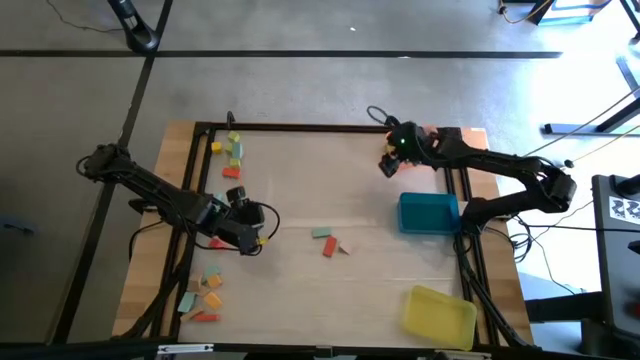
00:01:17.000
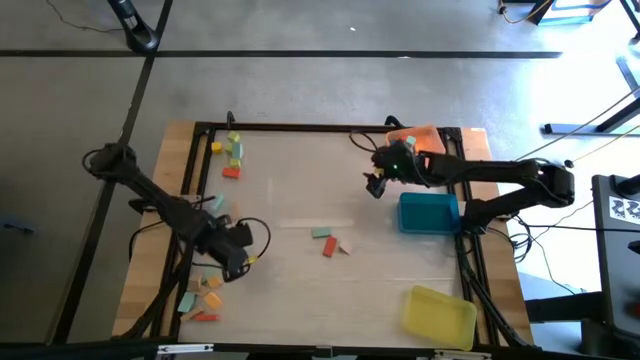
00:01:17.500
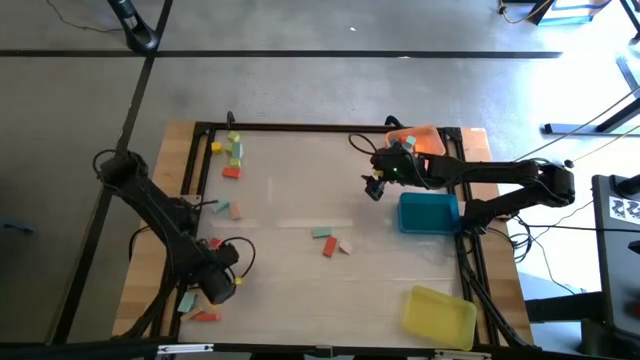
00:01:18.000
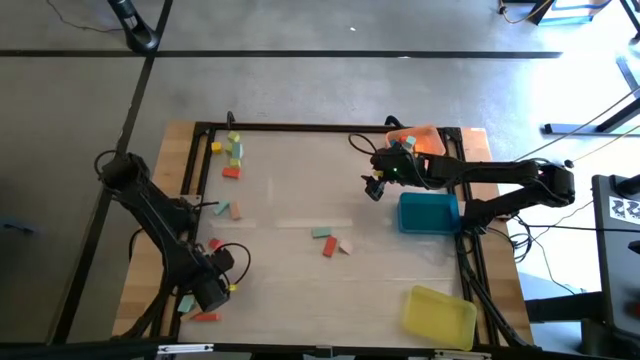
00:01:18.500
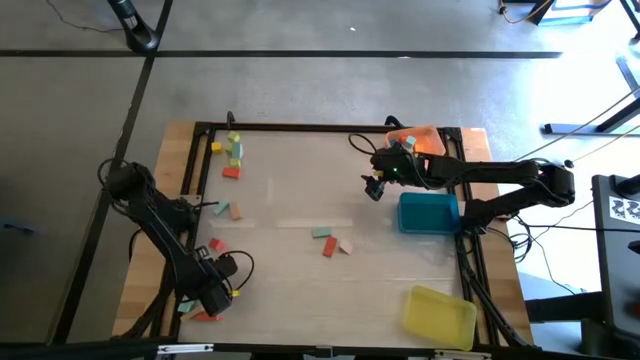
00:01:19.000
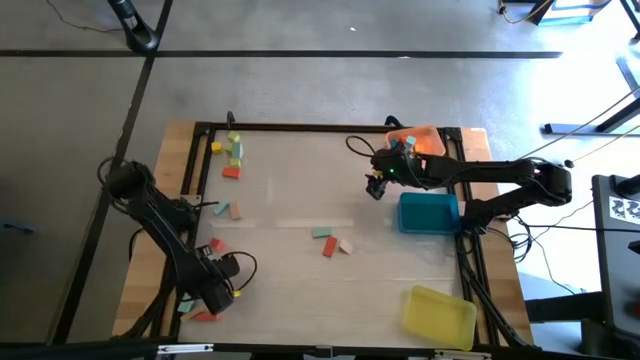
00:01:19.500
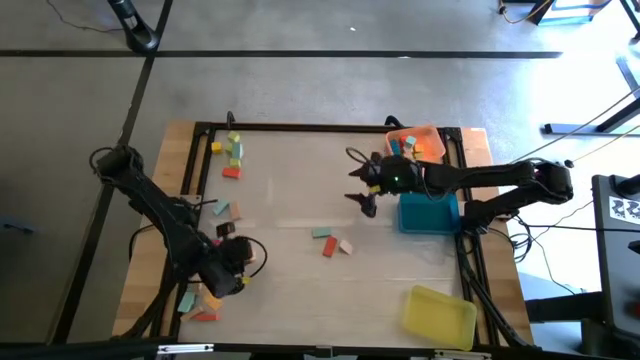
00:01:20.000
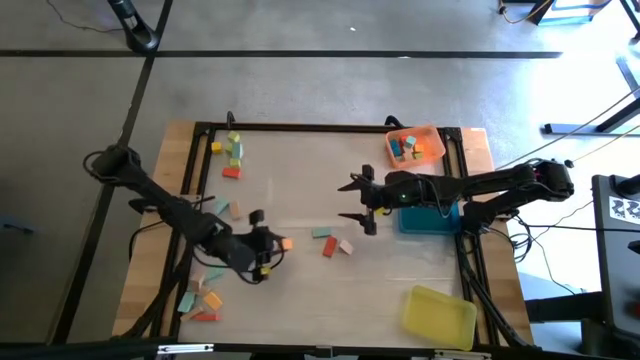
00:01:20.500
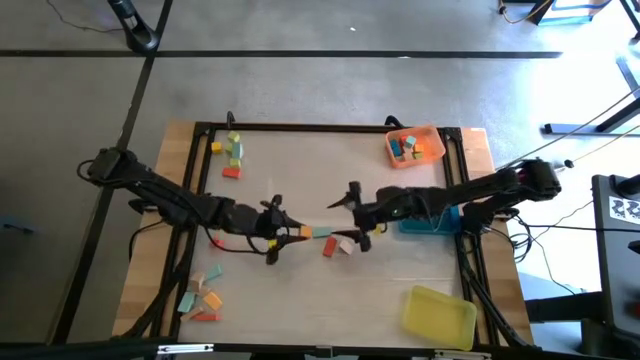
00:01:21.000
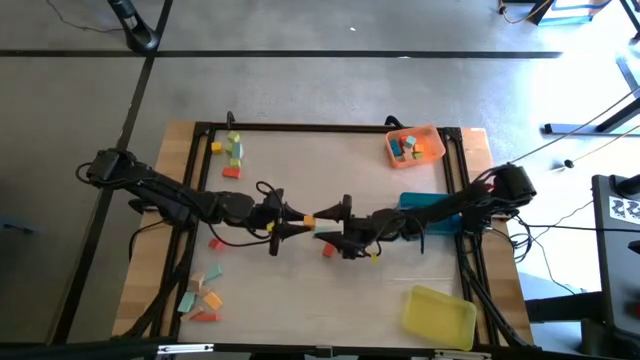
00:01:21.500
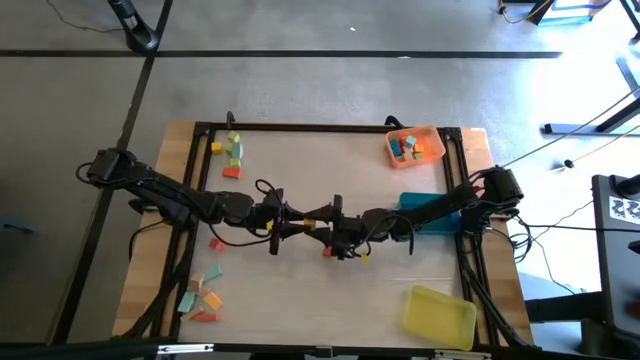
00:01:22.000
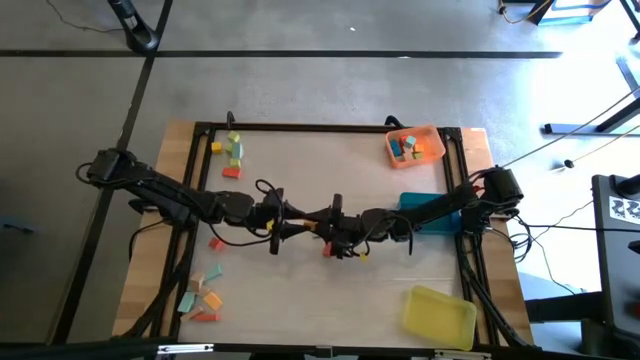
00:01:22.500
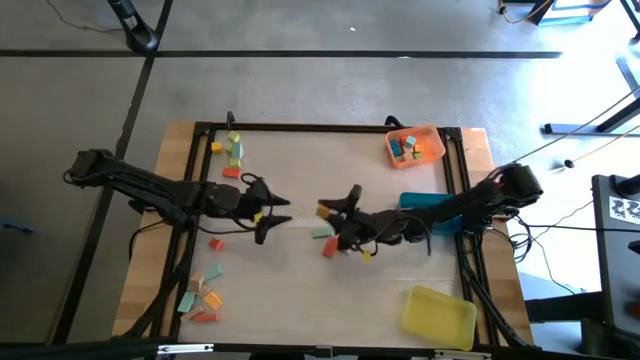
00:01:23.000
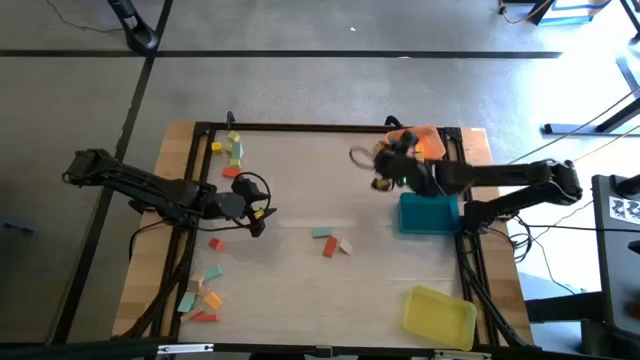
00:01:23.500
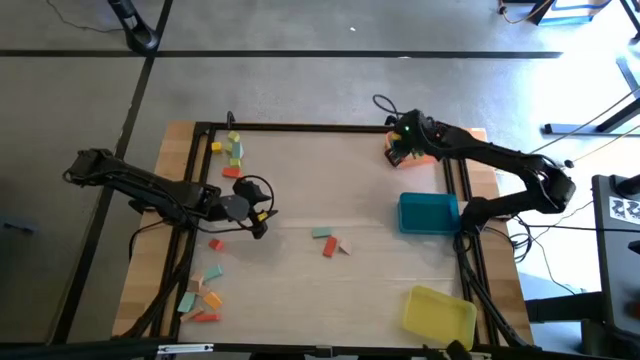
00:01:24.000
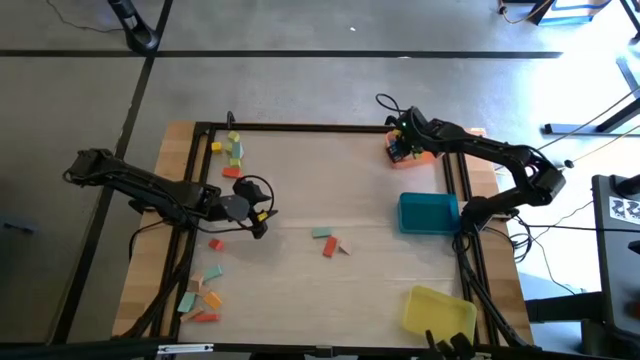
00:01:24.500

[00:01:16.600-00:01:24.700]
Task: Sort blocks by size
Put the orange cube block into the orange bin

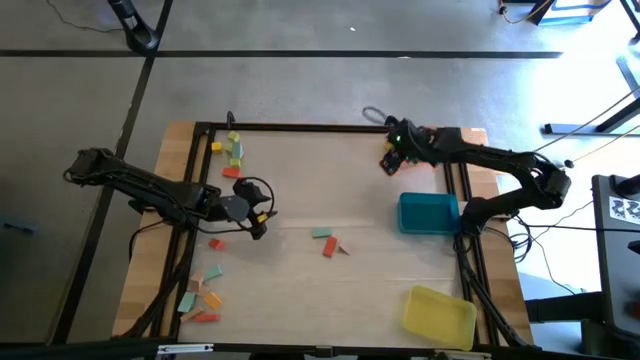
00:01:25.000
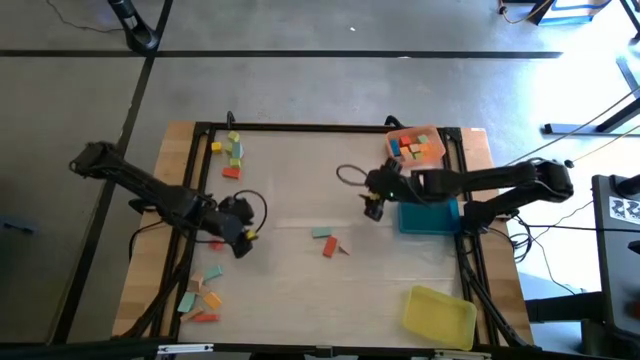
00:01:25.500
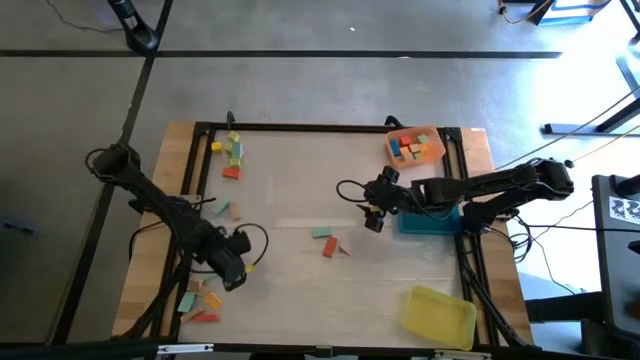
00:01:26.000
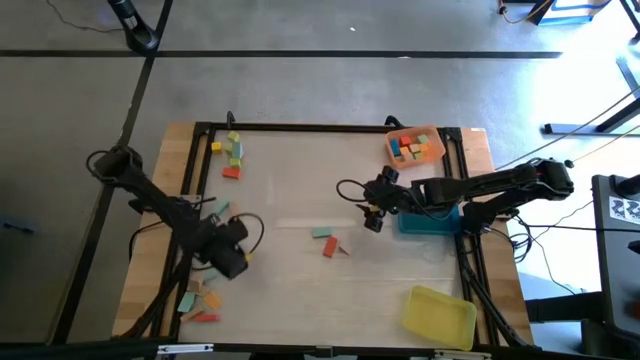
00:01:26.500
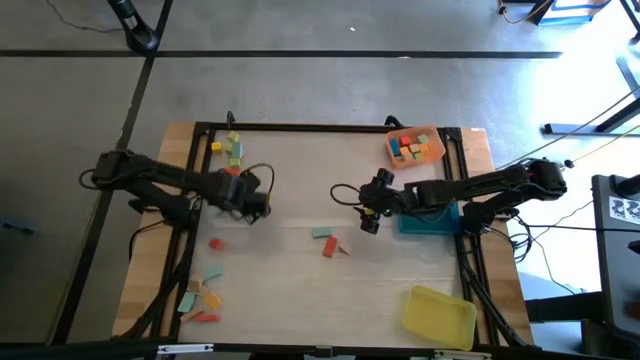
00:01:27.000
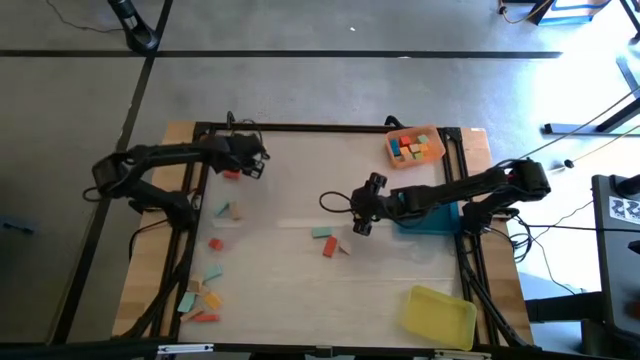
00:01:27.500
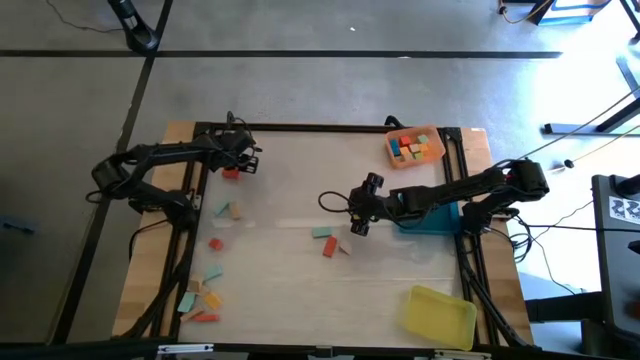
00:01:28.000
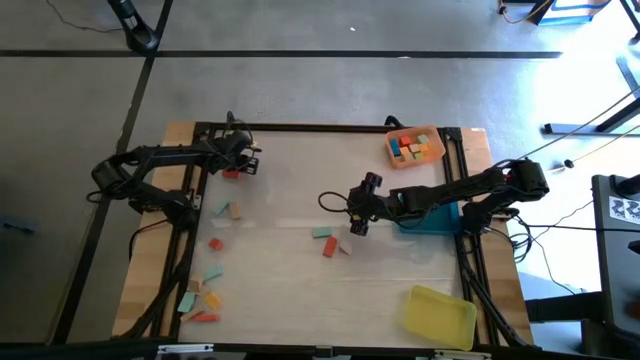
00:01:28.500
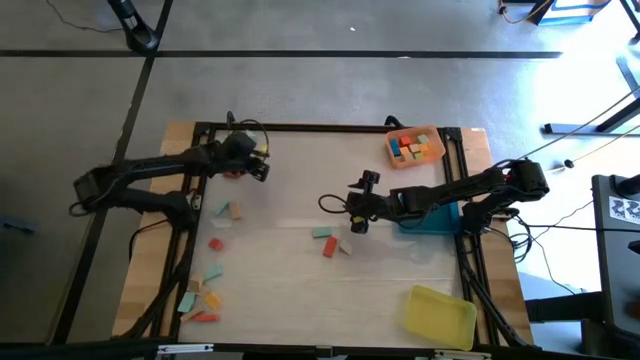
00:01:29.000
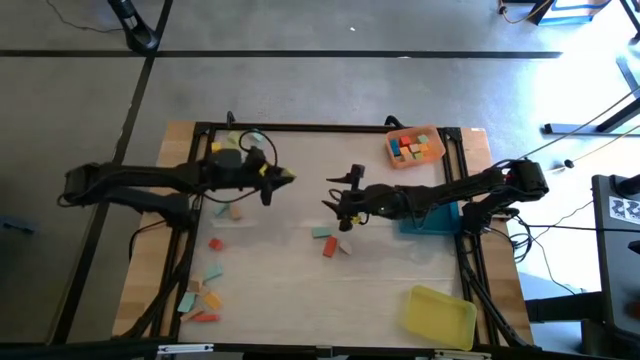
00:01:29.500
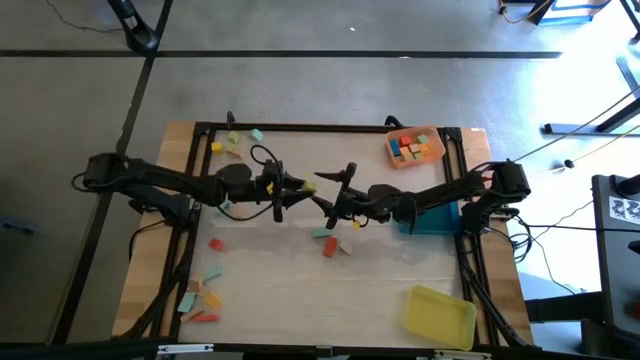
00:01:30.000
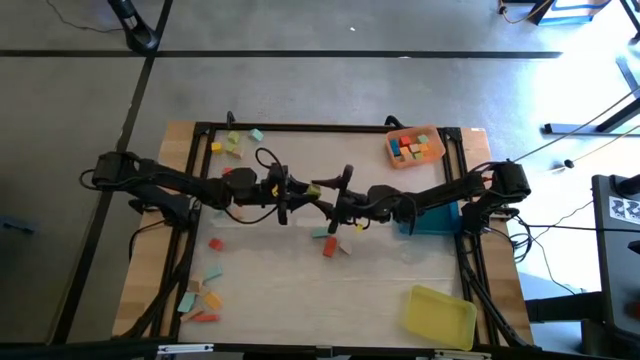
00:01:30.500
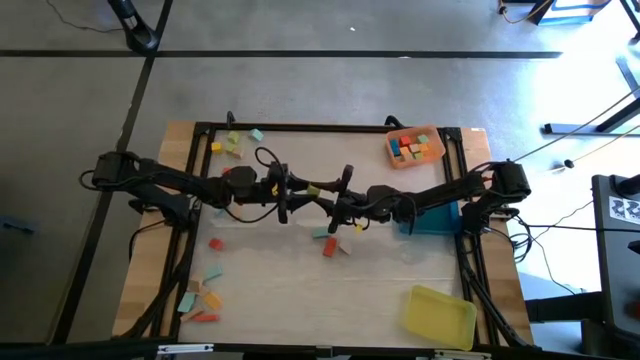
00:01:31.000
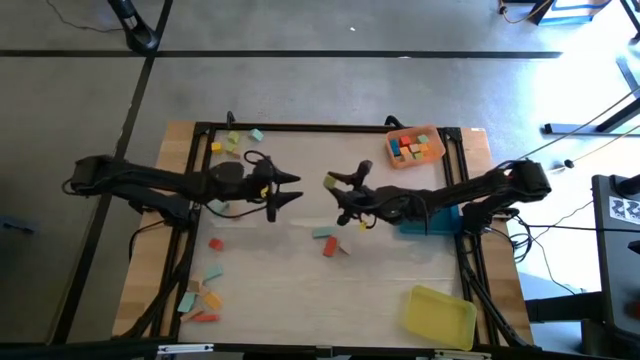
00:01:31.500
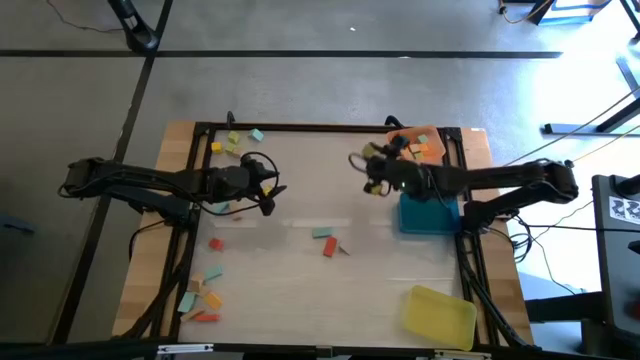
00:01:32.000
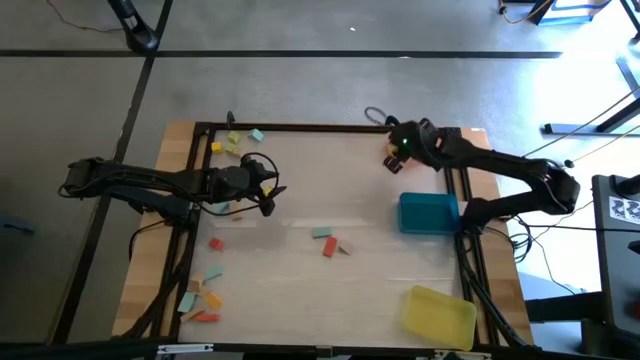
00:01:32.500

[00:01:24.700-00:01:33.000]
Put the green cube block into the orange bin

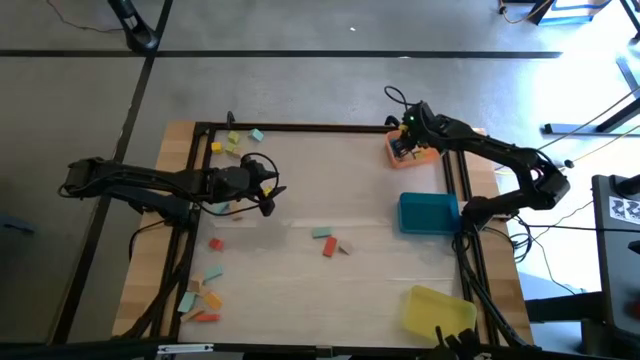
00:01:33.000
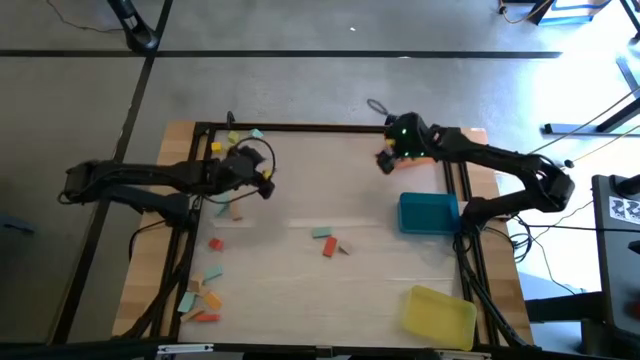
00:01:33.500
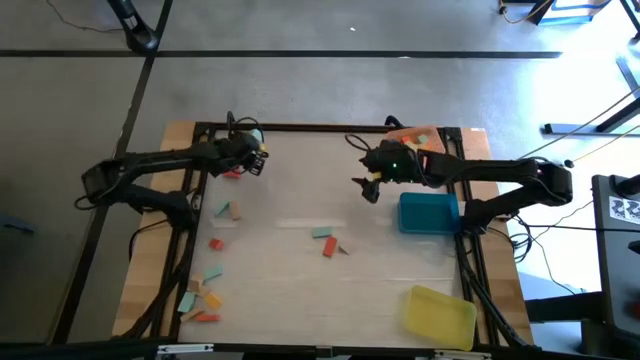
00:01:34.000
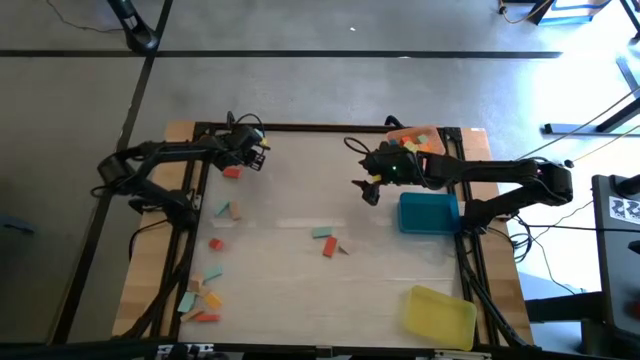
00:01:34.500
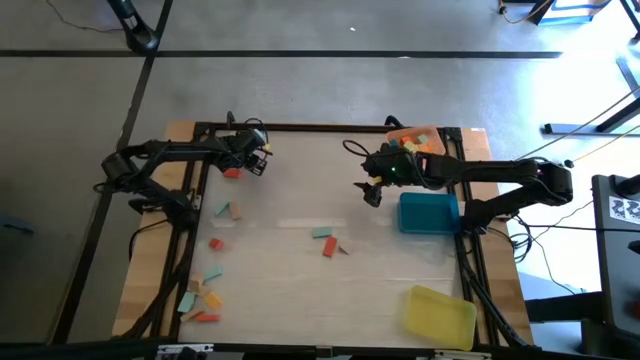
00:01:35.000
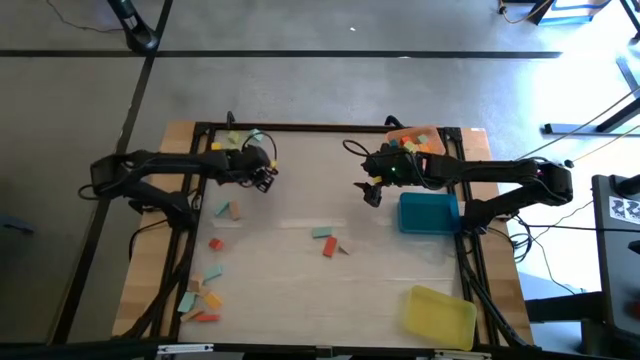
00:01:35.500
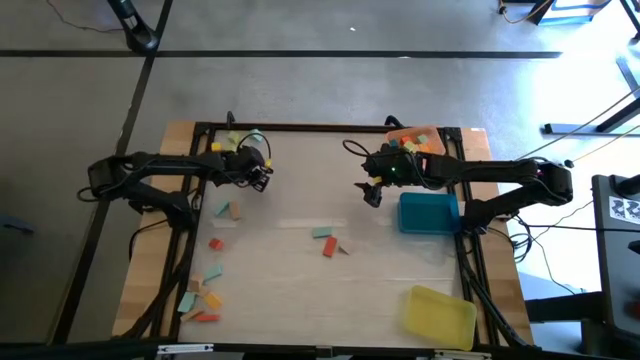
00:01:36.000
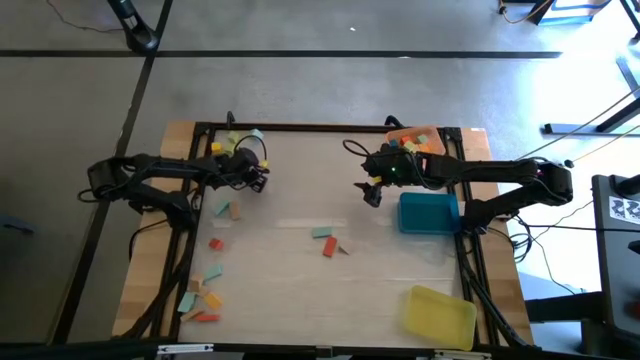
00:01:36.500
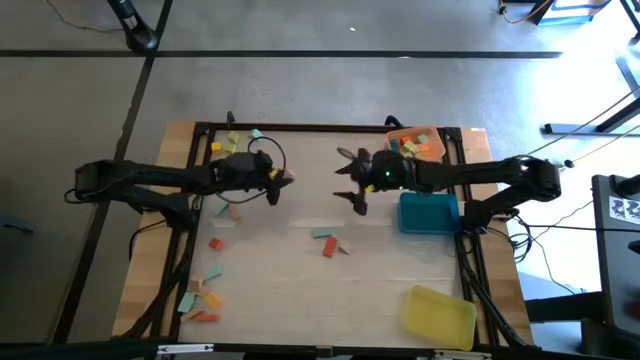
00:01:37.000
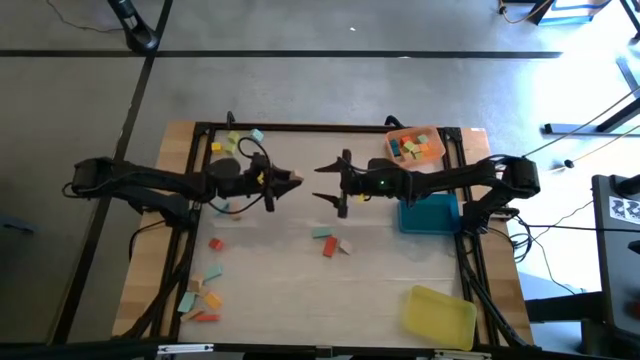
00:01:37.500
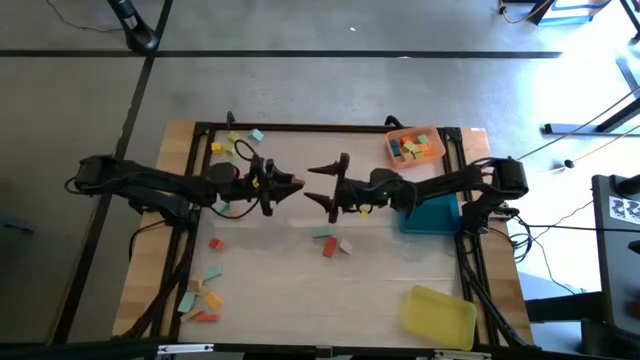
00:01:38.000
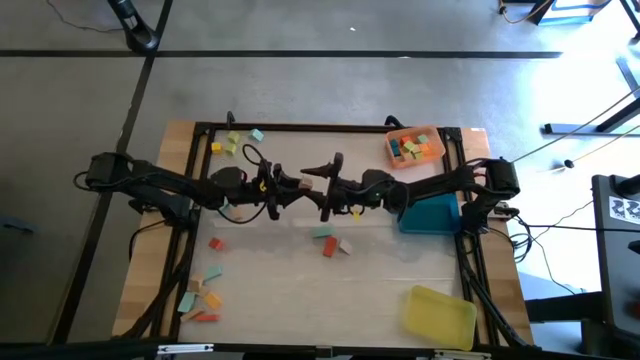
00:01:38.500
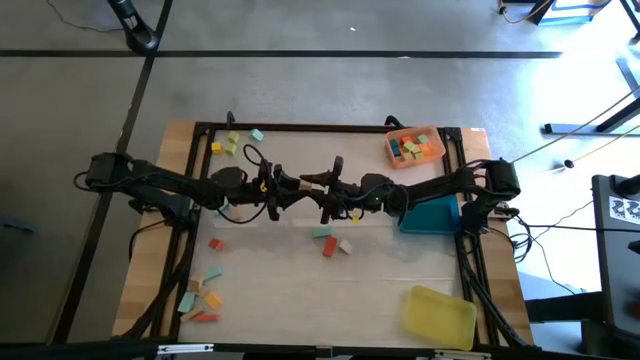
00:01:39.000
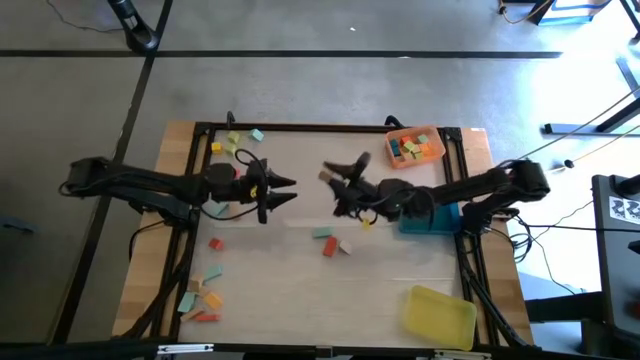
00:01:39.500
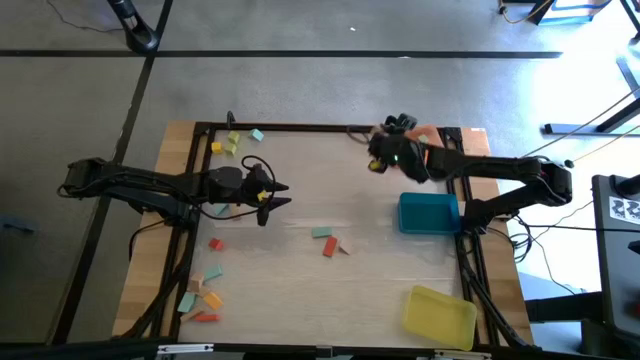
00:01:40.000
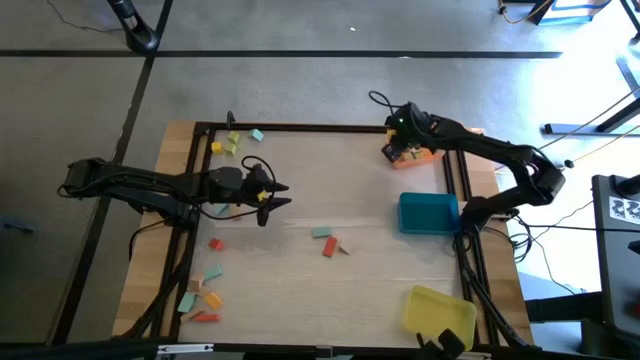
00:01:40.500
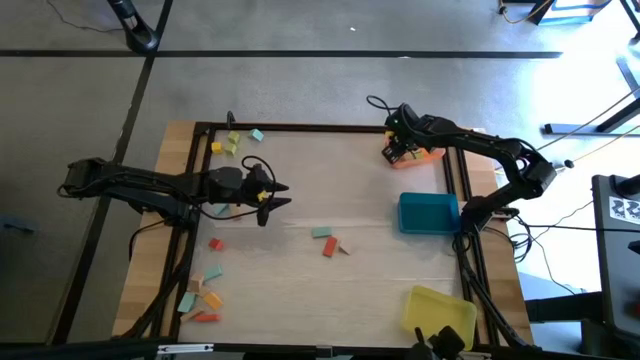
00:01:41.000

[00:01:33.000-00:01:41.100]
Put the brown cube block into the orange bin
